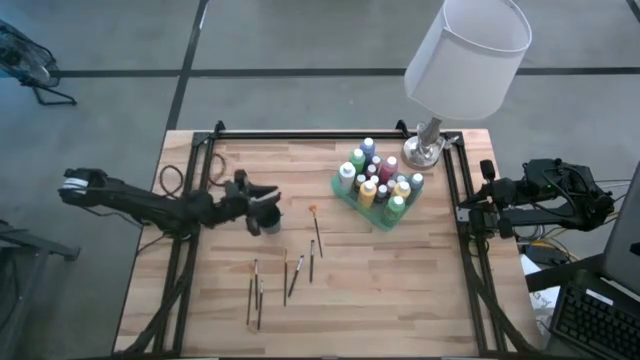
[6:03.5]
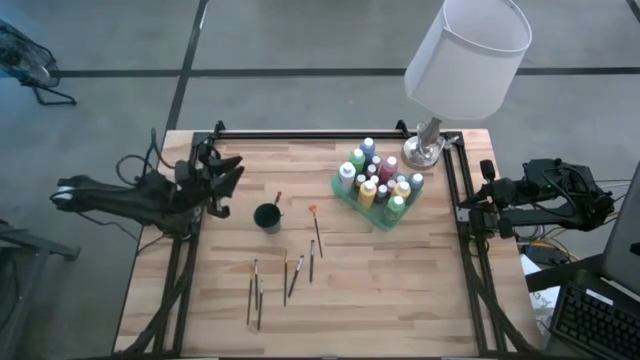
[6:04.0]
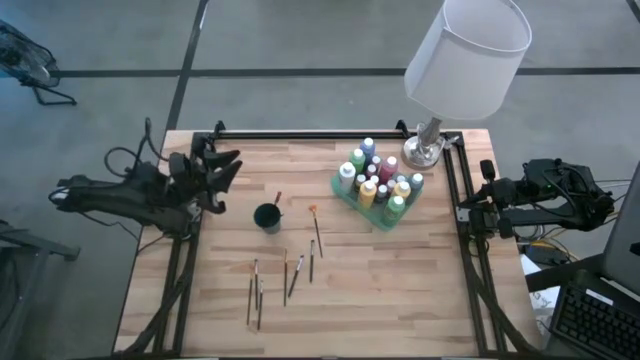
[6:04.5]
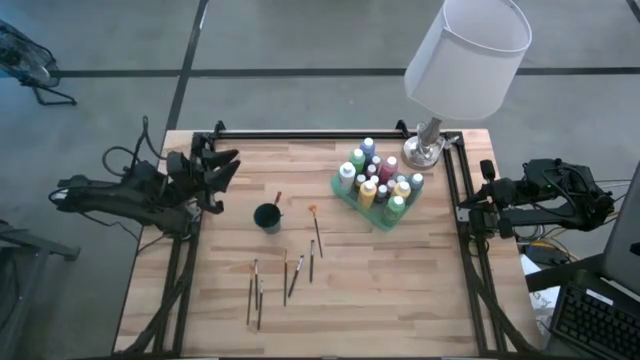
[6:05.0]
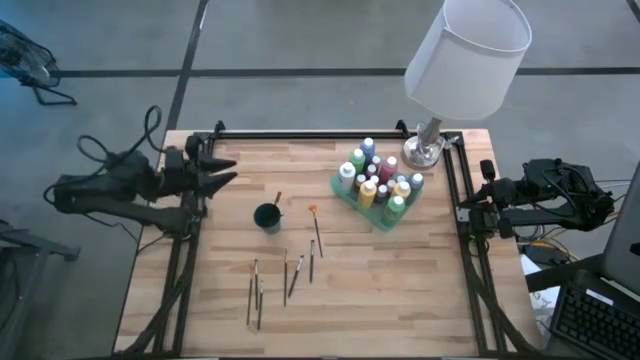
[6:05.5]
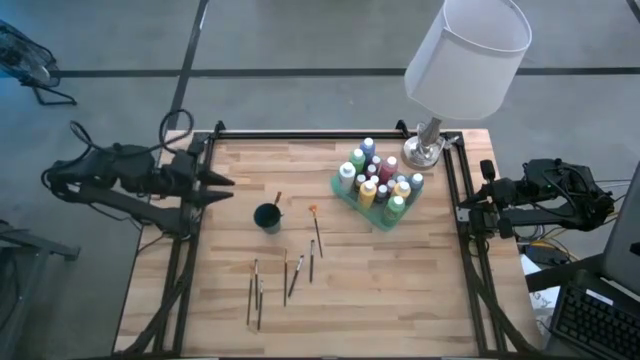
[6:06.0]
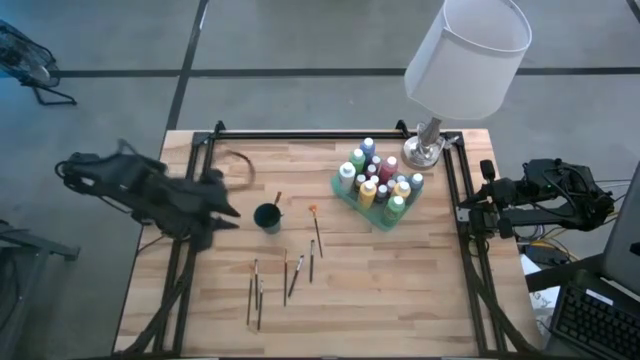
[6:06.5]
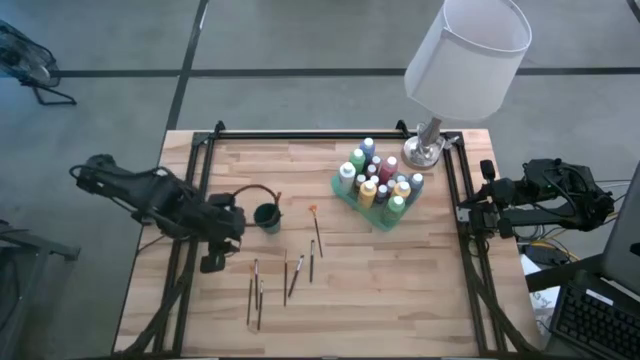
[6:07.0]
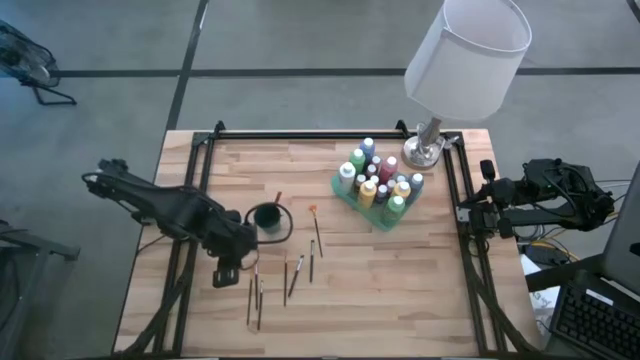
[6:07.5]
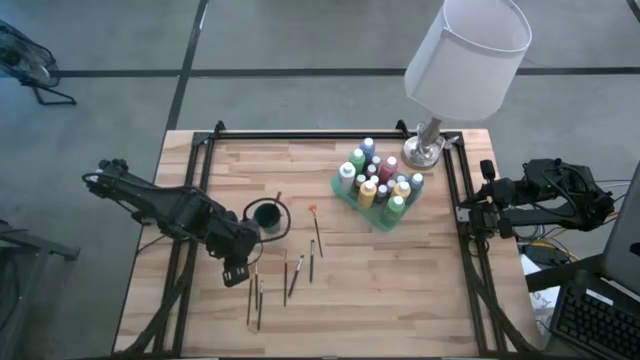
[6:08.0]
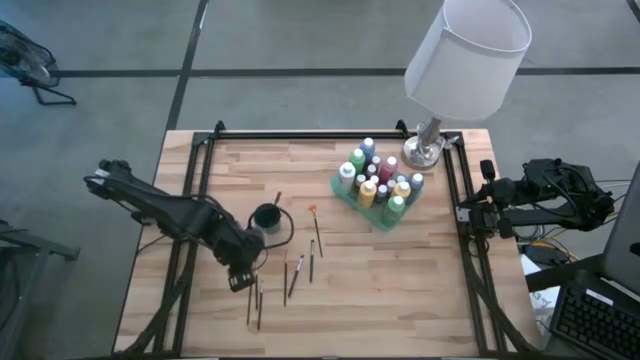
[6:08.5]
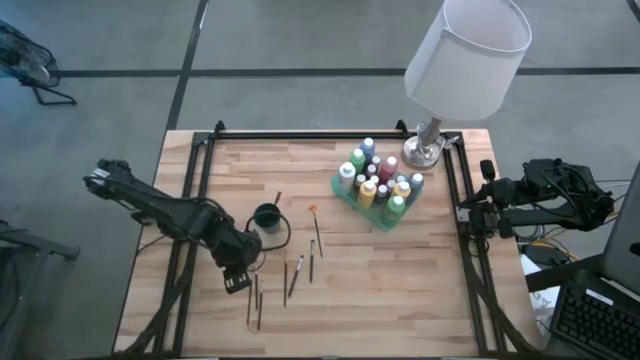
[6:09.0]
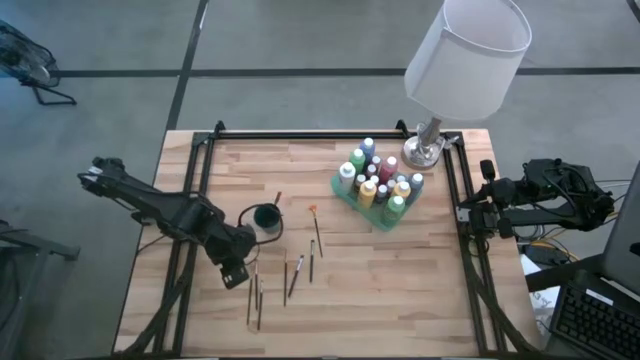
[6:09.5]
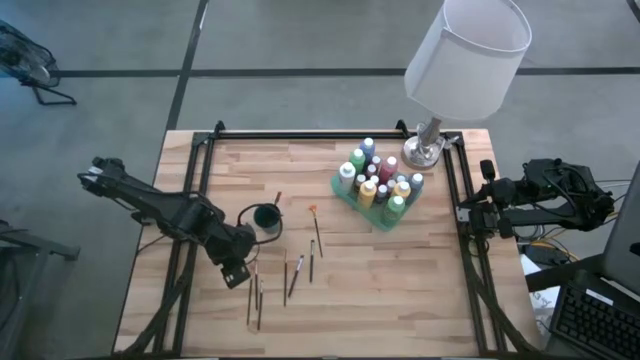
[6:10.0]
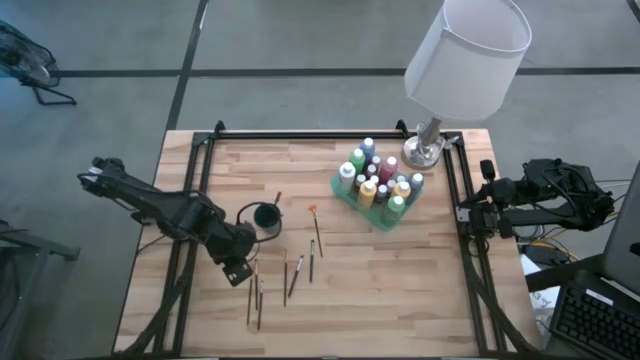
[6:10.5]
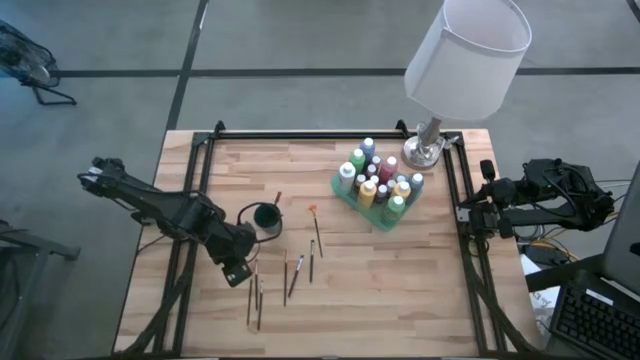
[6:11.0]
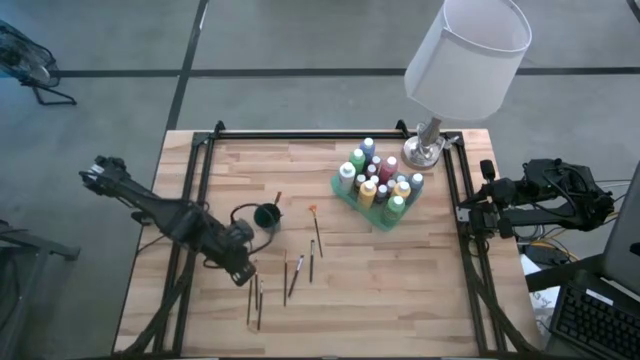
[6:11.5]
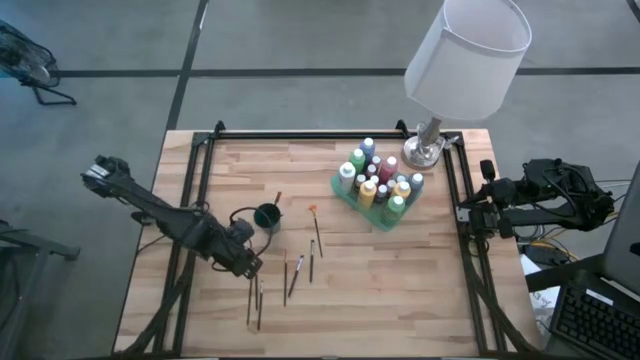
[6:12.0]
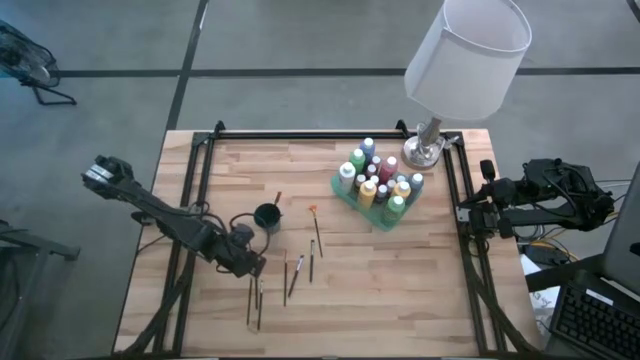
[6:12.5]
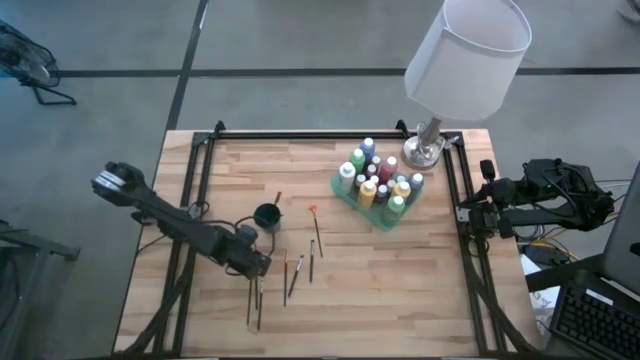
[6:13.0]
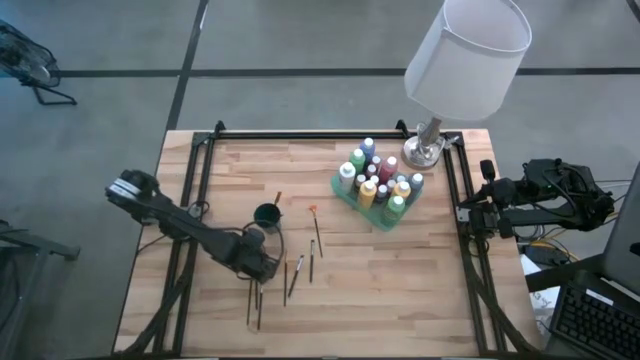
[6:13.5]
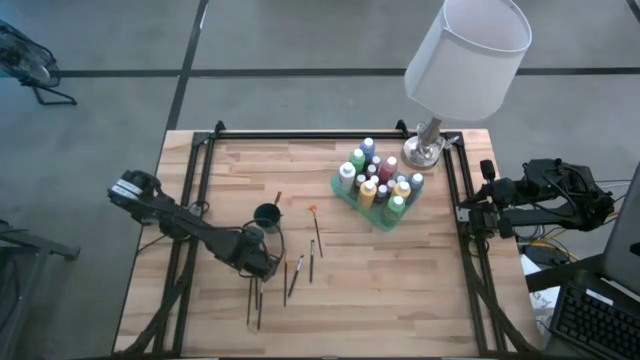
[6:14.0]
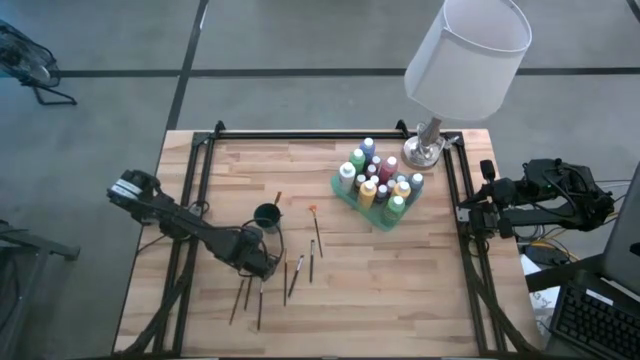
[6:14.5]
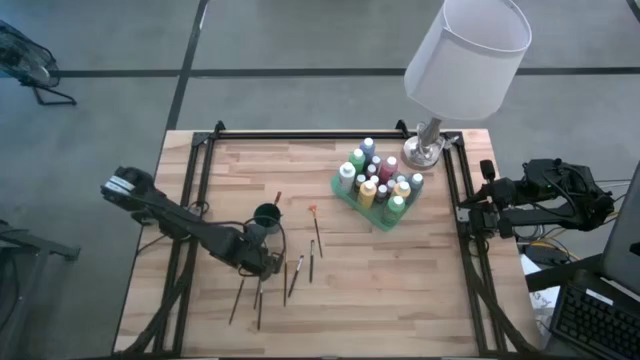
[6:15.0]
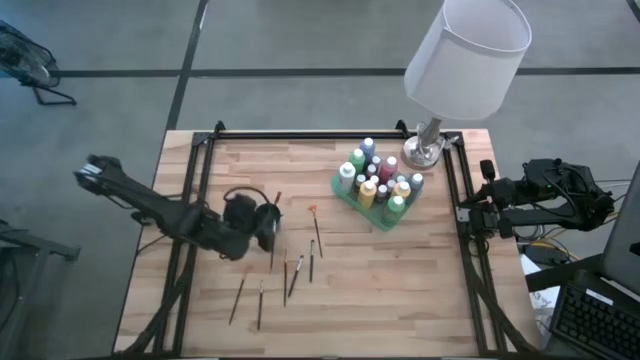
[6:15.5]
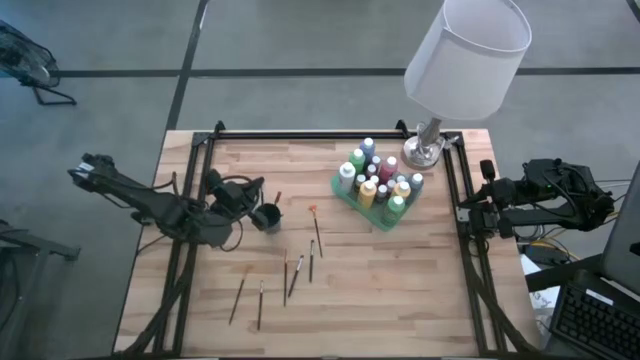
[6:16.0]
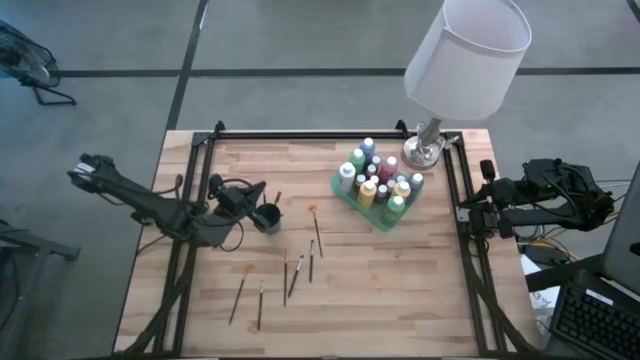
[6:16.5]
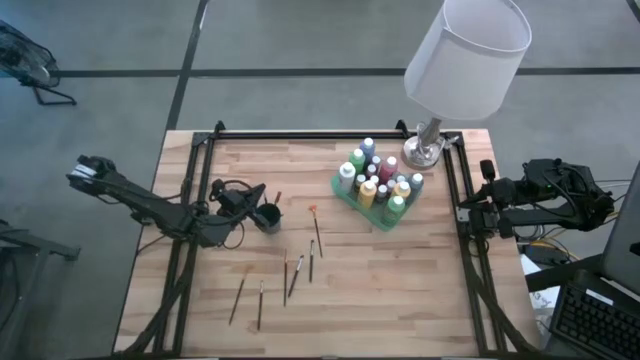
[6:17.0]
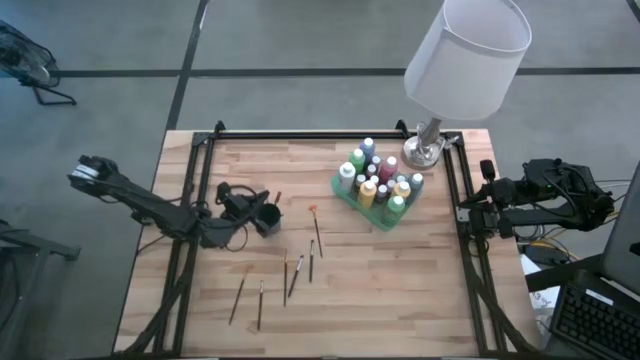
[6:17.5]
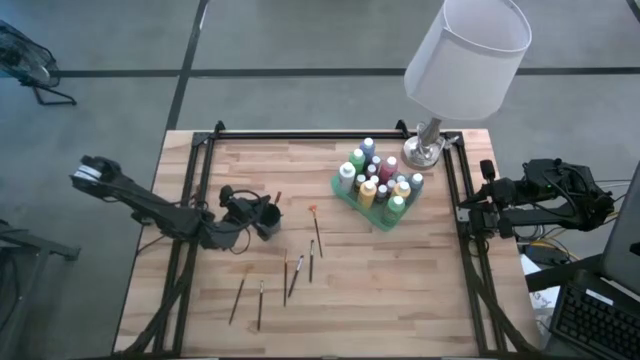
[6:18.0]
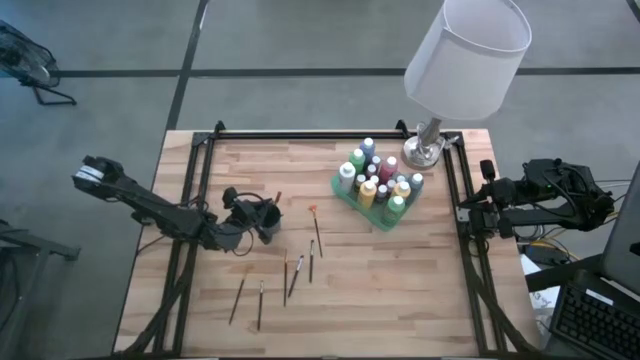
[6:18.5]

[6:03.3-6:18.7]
Task: Pick & Place Paint Supplies
Put the silver paint brush into the green cup

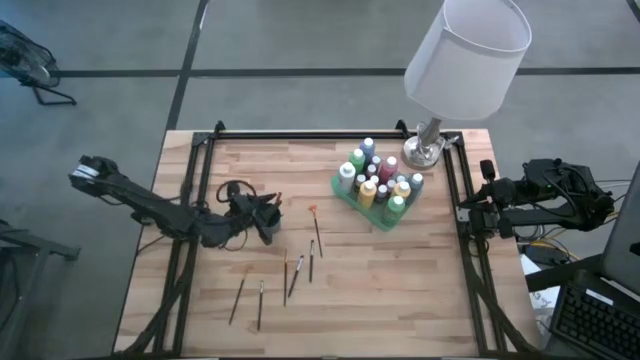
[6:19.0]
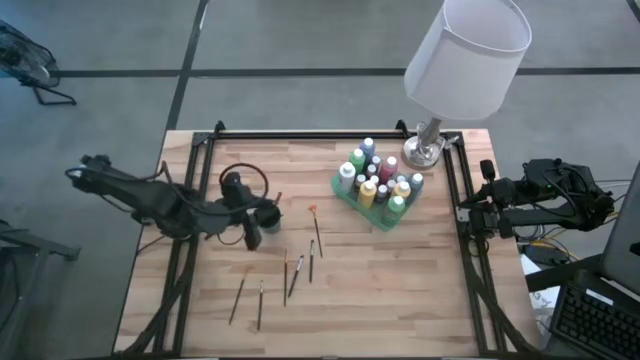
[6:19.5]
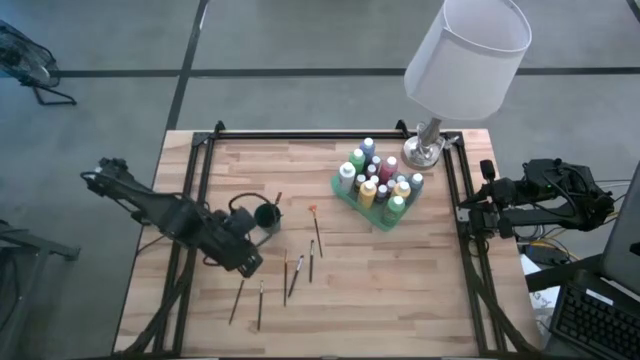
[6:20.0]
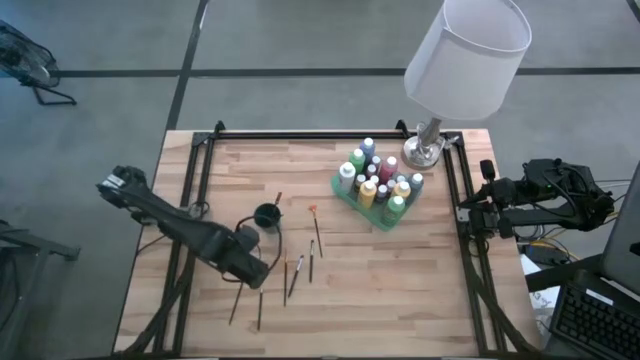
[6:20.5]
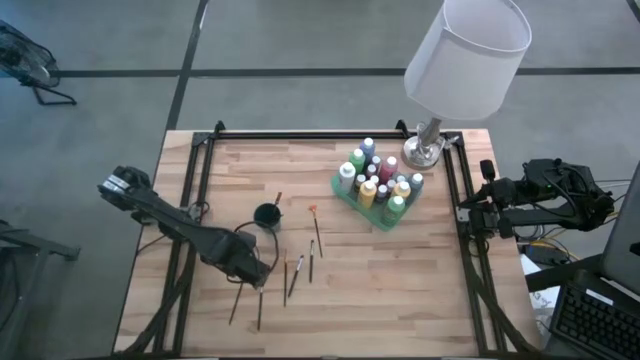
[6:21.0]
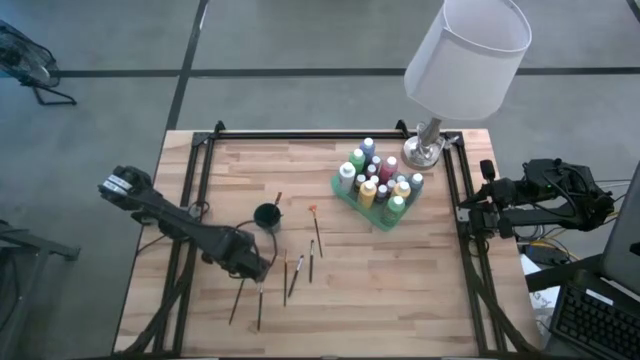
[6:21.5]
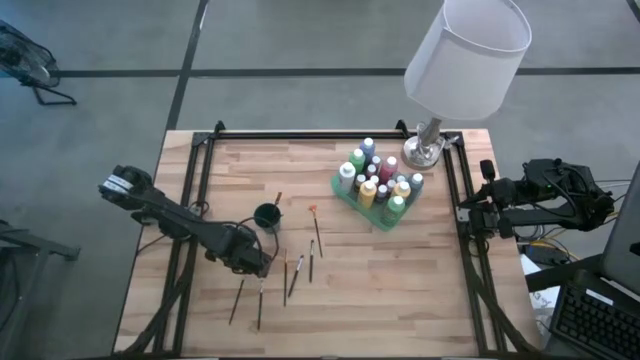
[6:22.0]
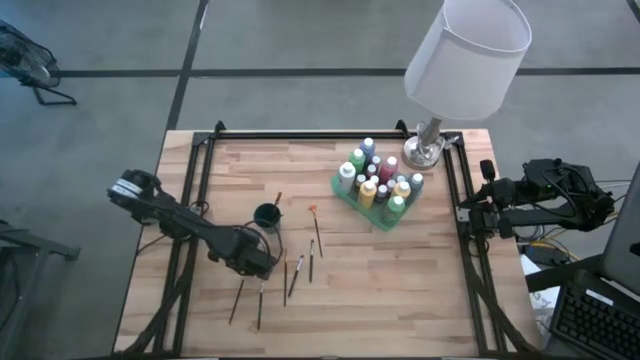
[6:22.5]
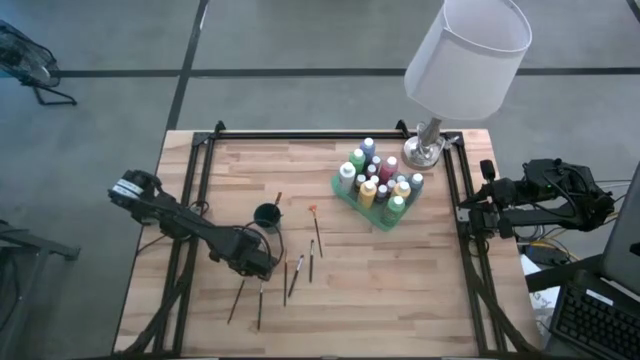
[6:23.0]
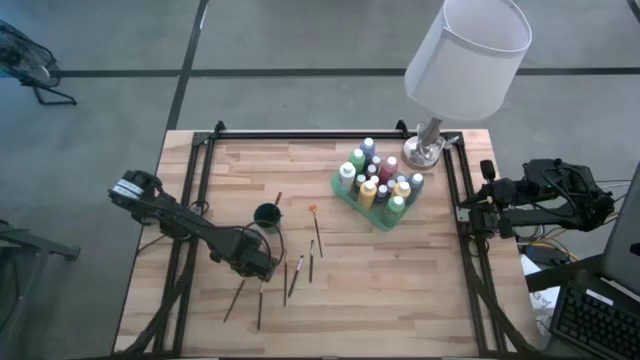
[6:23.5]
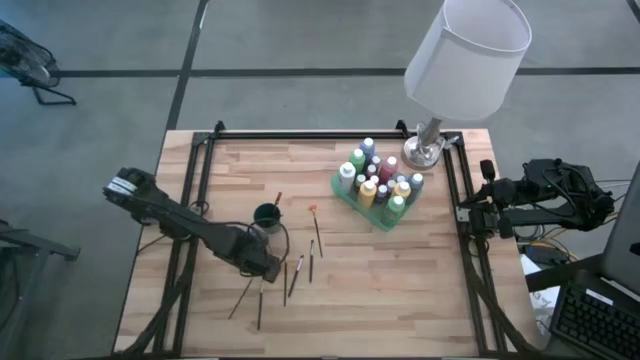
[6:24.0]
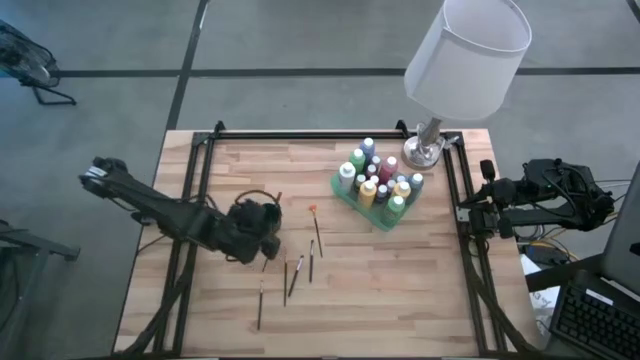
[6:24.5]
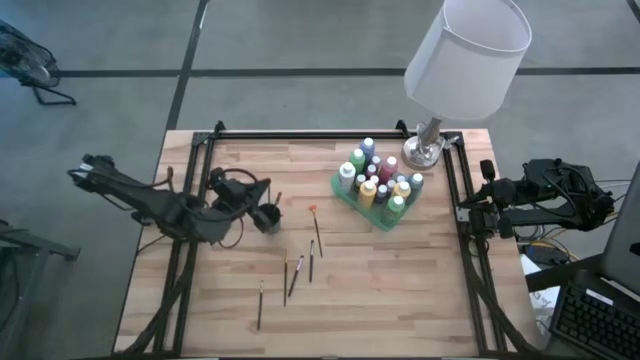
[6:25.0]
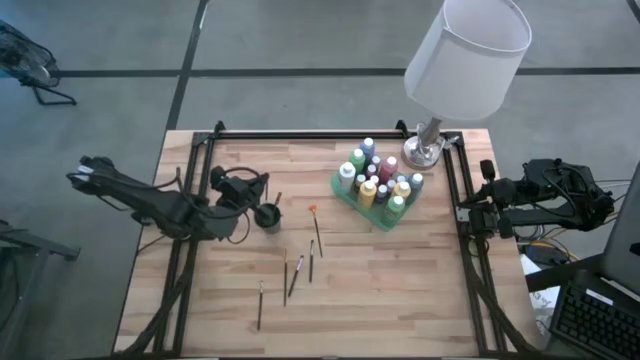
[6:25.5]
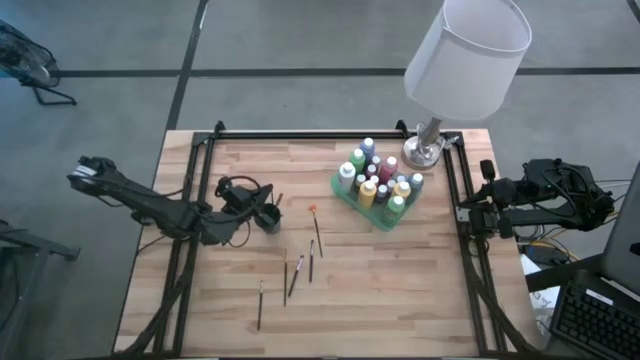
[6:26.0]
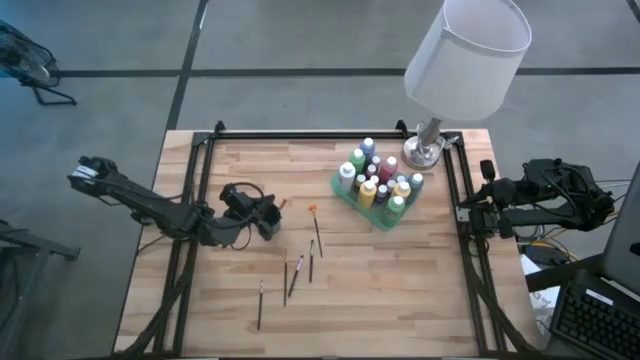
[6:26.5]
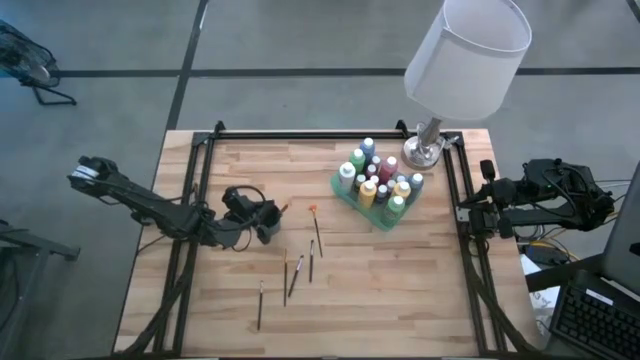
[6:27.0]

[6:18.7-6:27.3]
Put the orange paint brush into the green cup
